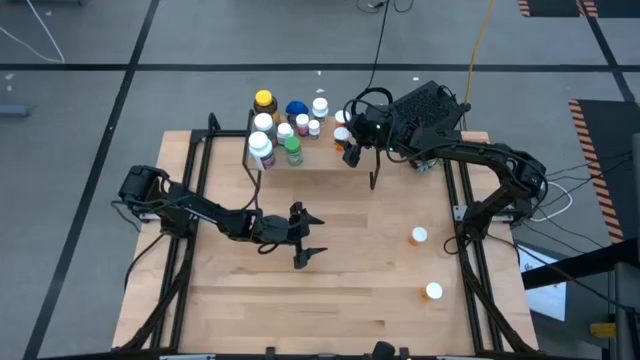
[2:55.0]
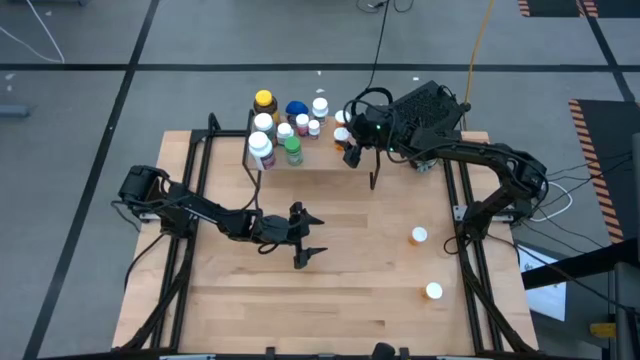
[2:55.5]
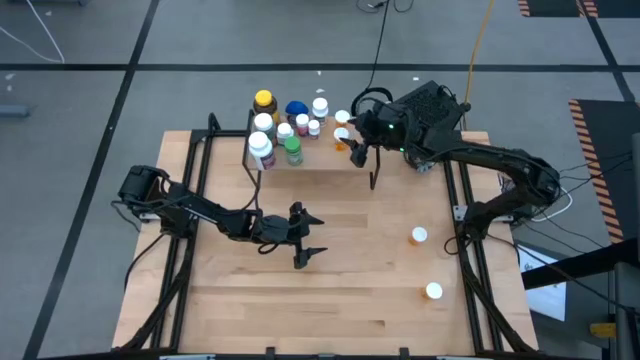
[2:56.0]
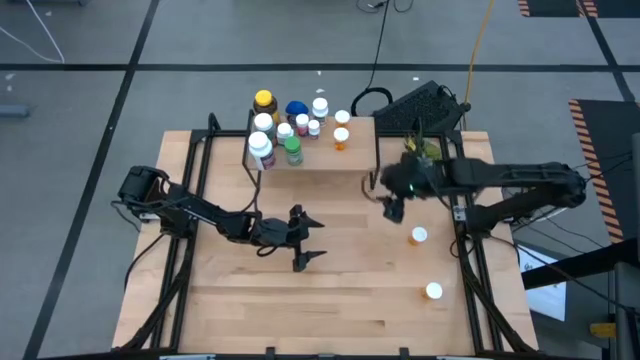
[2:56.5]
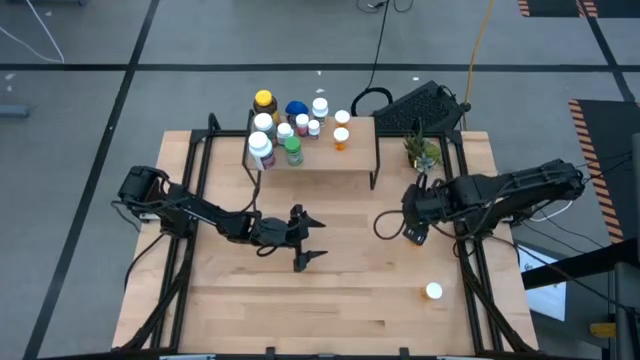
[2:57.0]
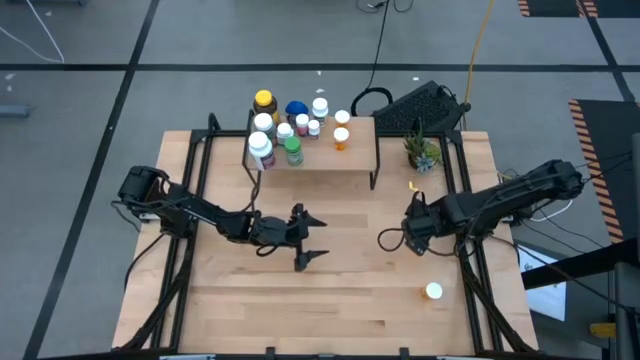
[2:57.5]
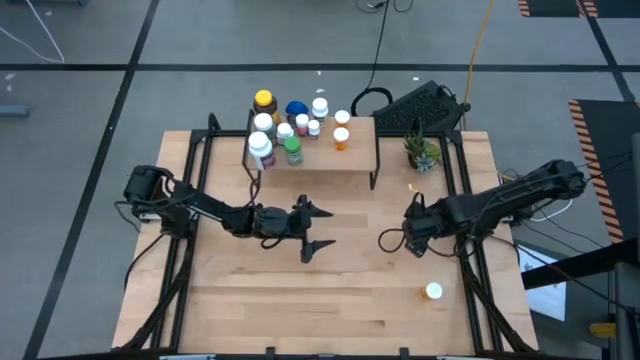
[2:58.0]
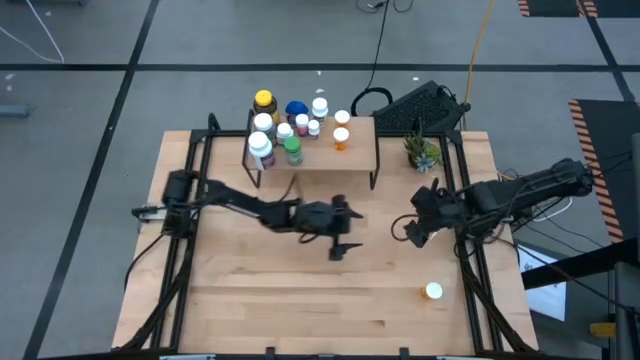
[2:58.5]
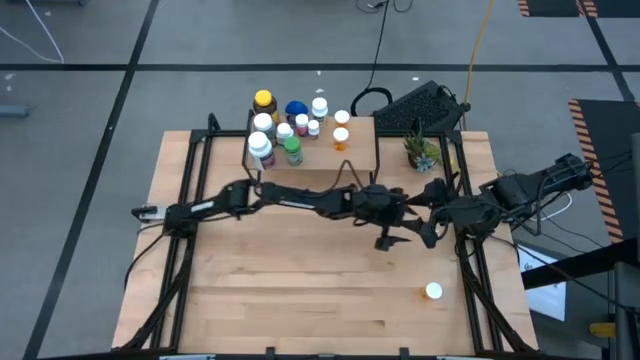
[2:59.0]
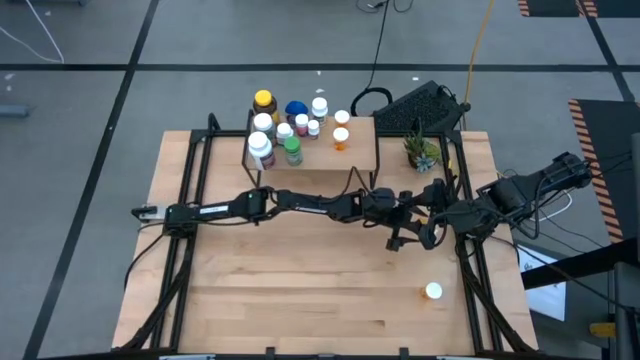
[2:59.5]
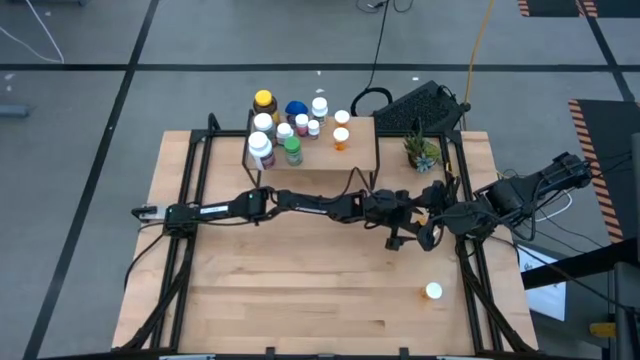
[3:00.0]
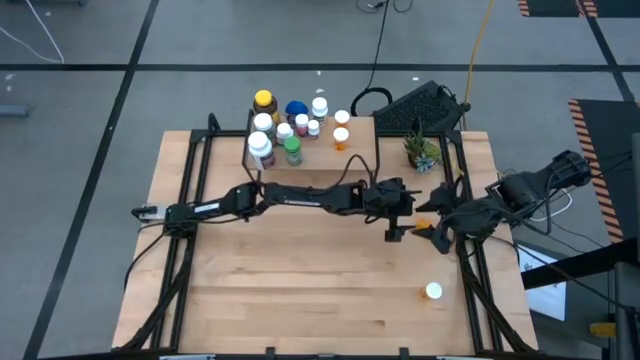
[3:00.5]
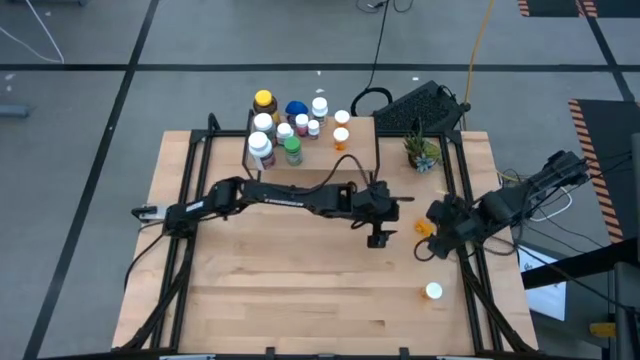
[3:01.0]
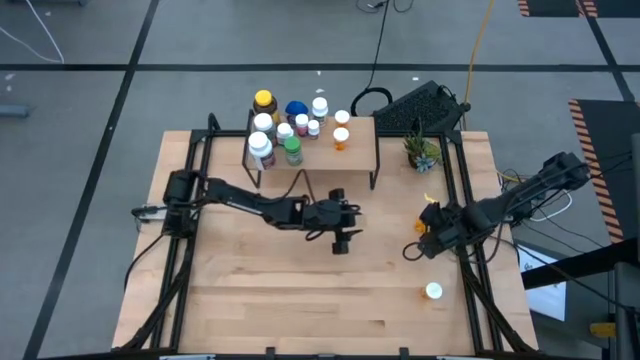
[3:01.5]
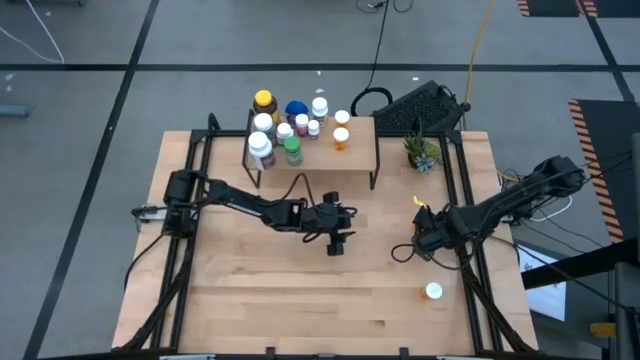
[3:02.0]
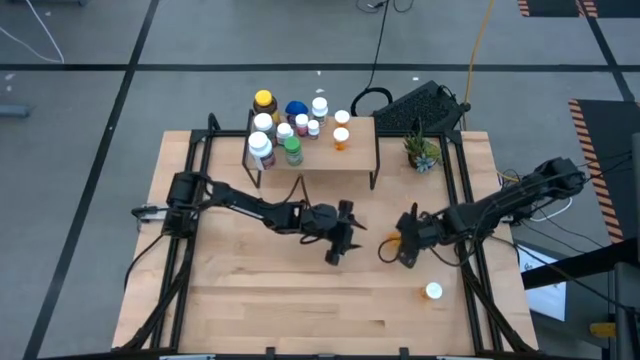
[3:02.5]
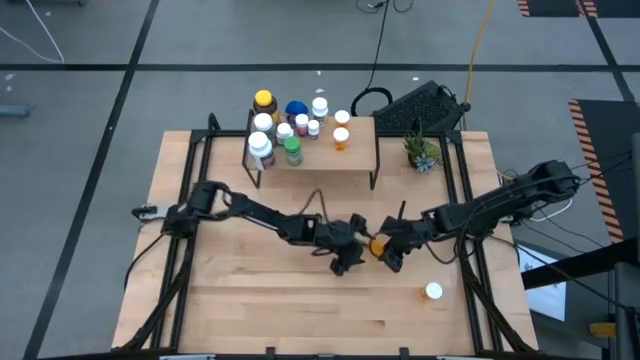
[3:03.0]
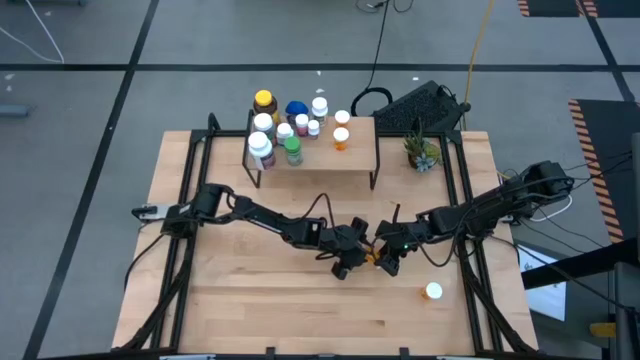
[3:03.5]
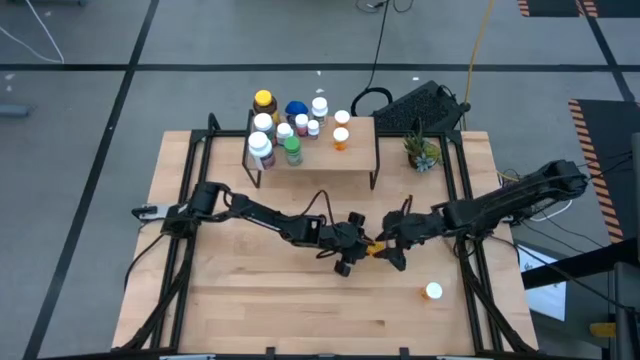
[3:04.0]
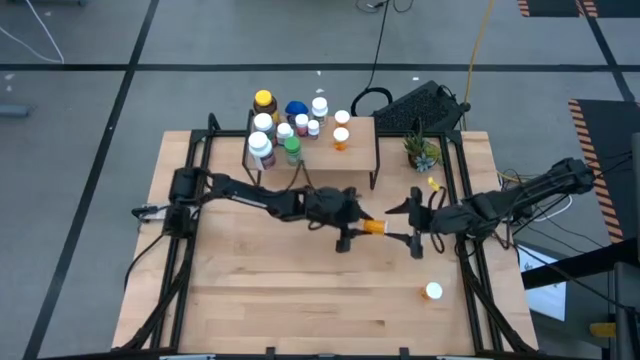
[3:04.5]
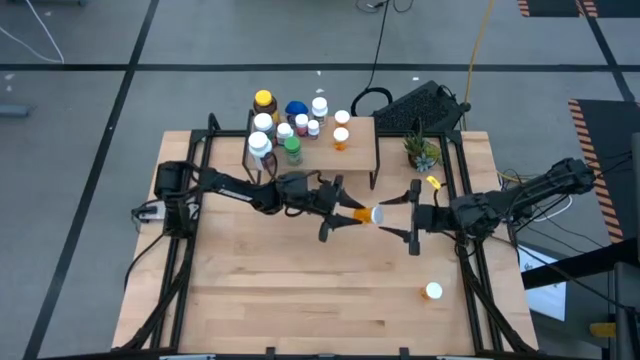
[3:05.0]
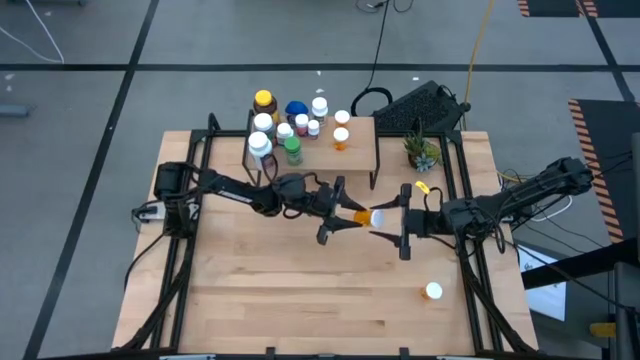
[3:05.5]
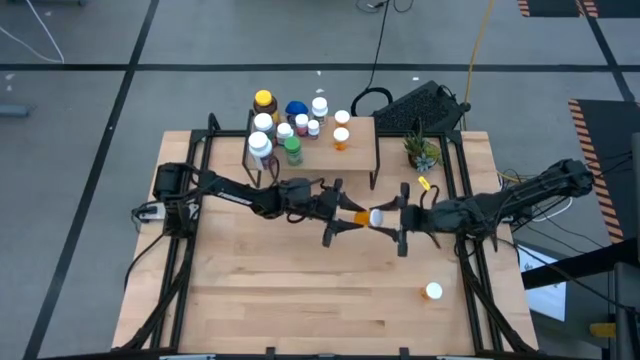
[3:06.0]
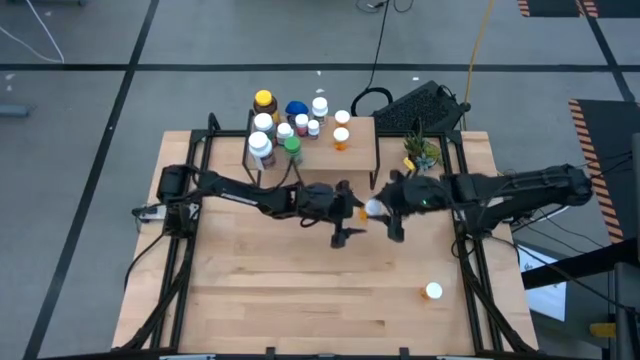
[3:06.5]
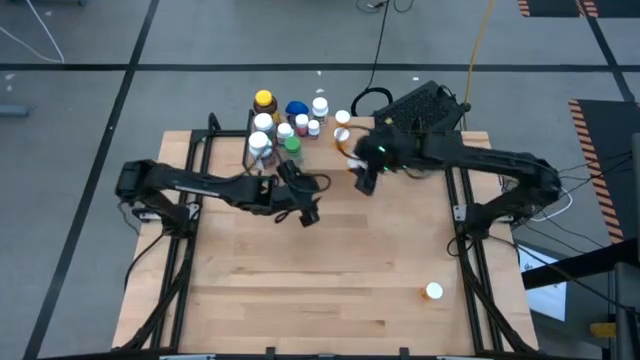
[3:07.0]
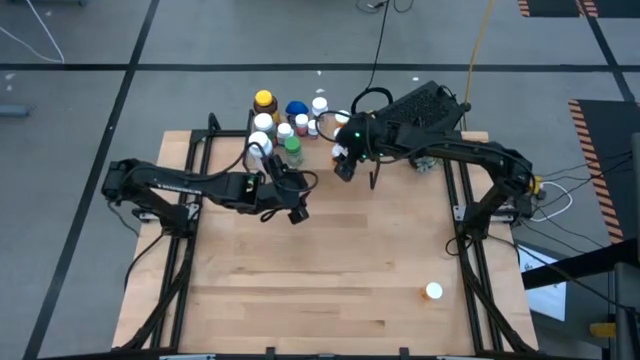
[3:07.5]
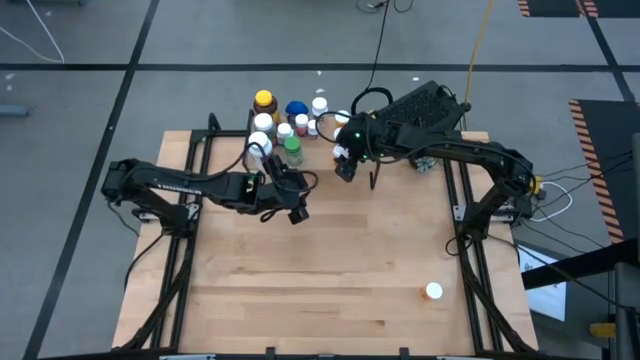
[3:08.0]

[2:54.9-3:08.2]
Task: Pick and place medicine bottles onto shelf by color
Put the top orange pill bottle on the shelf, aligned with the other orange pill bottle

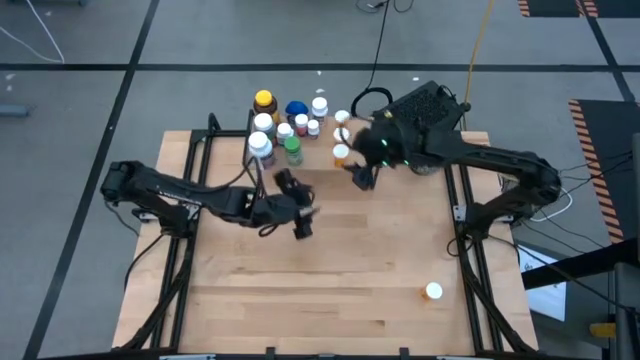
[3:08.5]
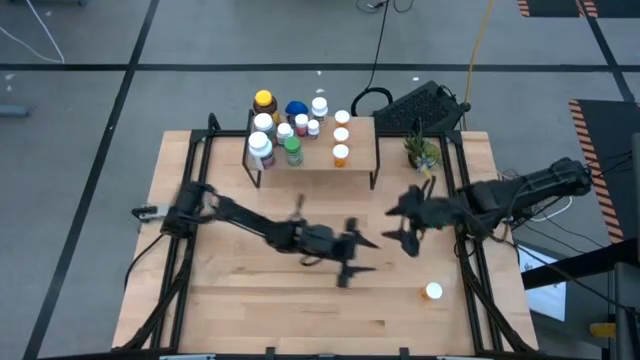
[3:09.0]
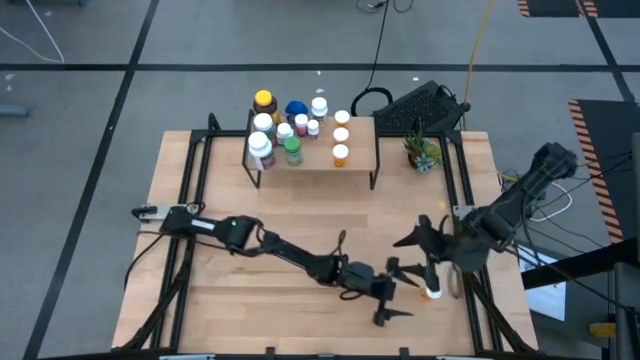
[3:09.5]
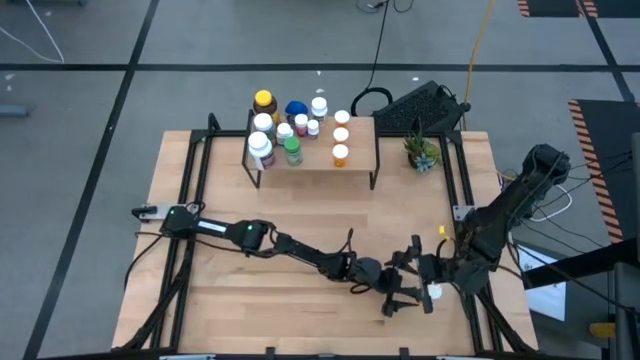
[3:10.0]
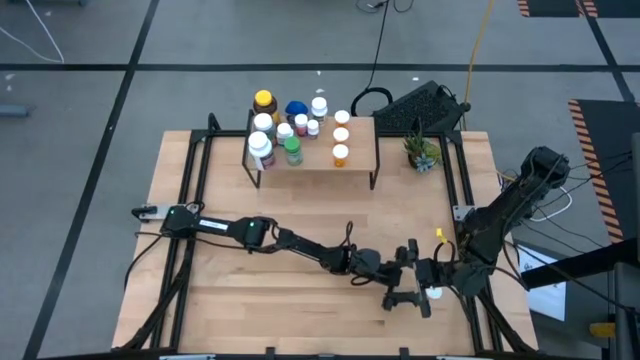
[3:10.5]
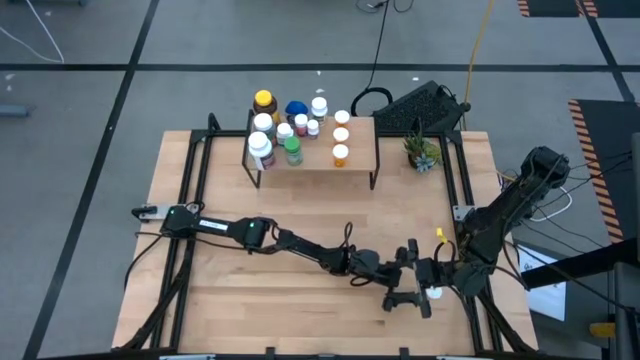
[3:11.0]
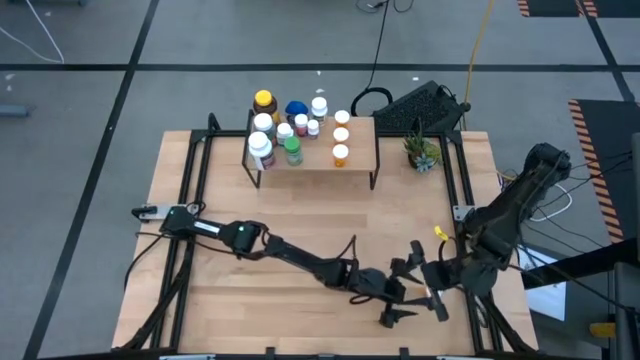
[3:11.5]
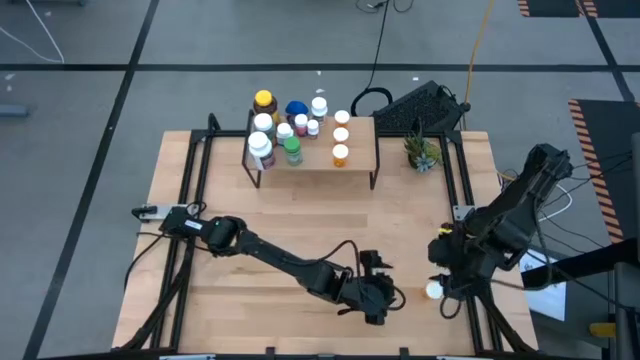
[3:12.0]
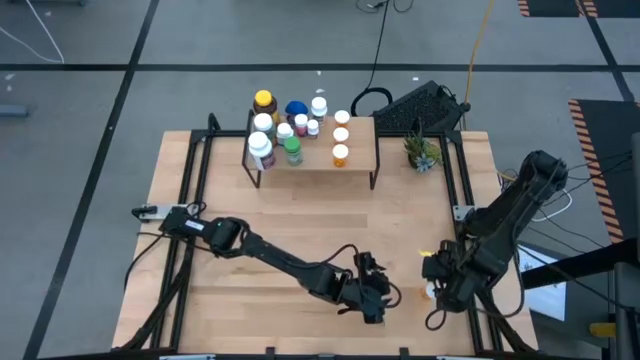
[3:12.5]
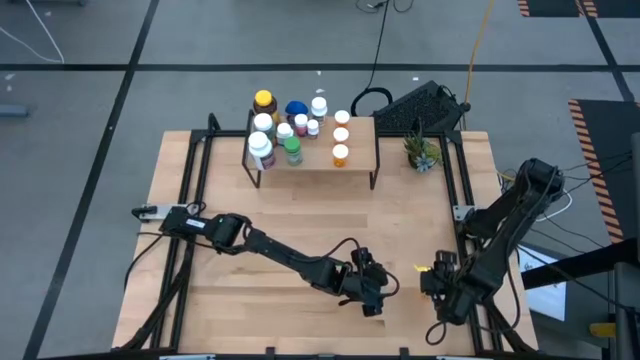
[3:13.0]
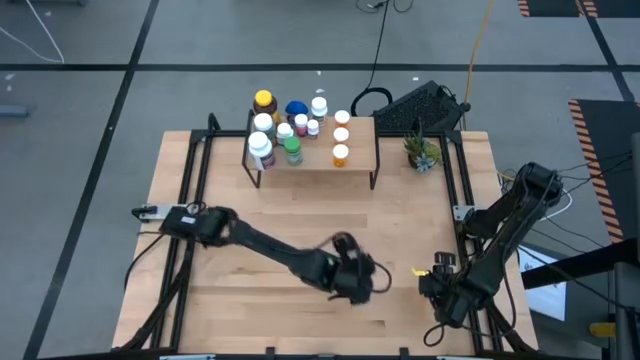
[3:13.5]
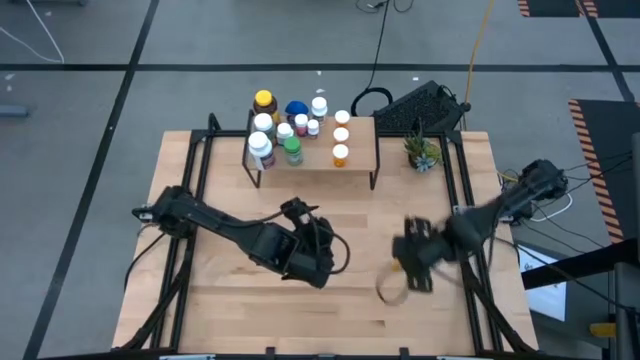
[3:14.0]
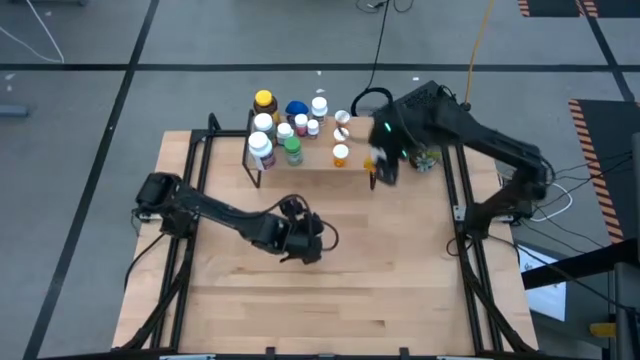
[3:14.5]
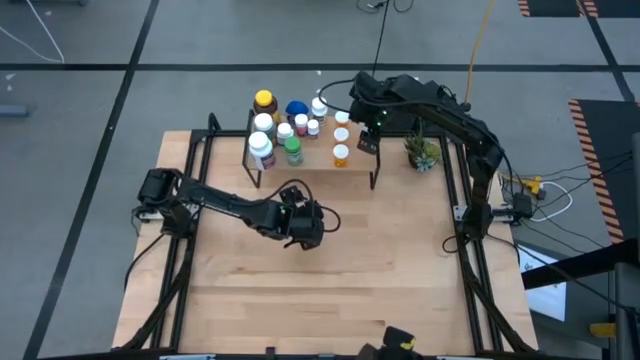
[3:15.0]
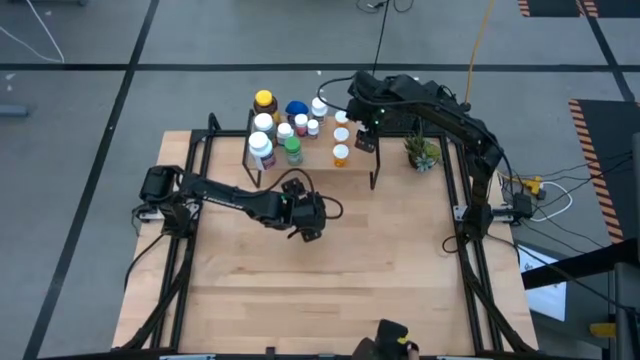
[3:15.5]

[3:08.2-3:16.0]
Put the orange pill bottle on the shelf
